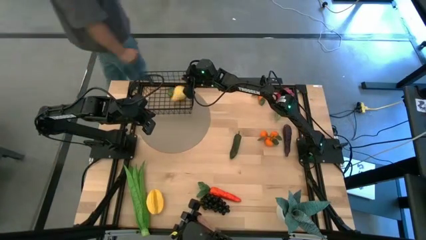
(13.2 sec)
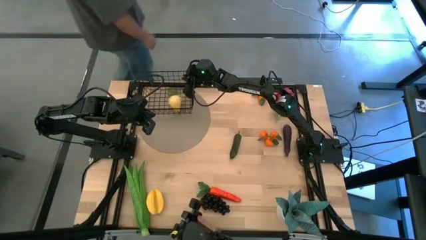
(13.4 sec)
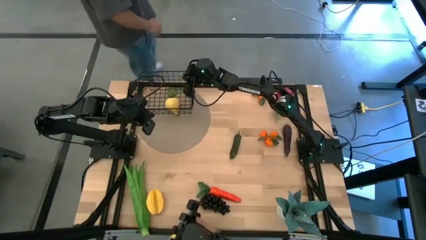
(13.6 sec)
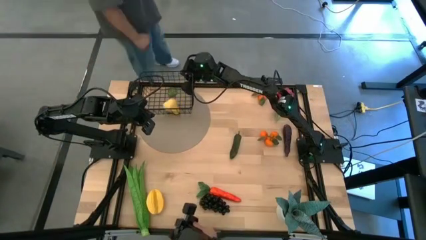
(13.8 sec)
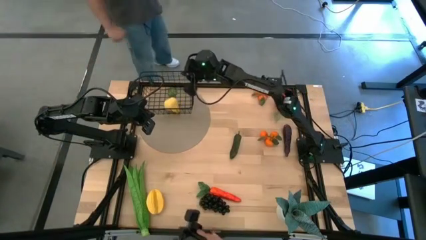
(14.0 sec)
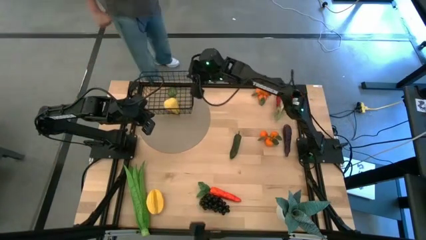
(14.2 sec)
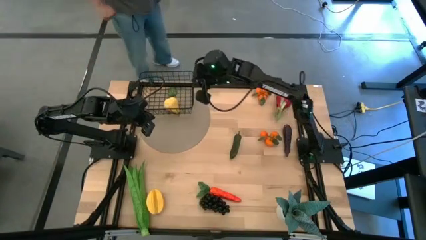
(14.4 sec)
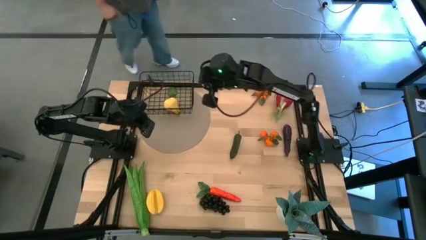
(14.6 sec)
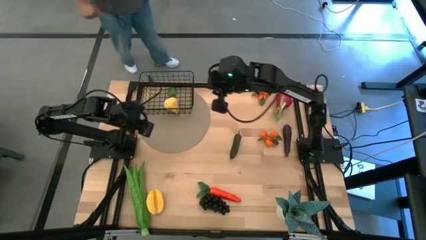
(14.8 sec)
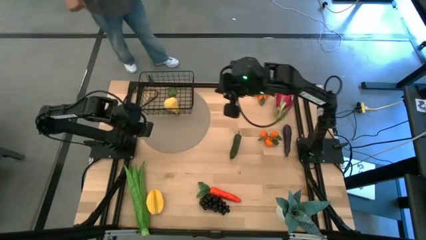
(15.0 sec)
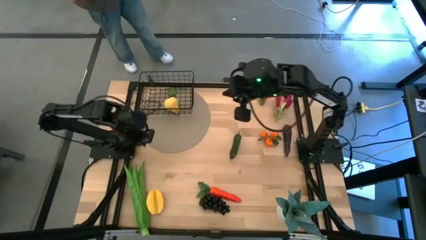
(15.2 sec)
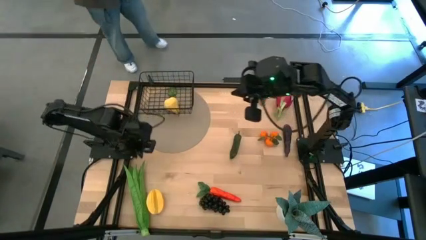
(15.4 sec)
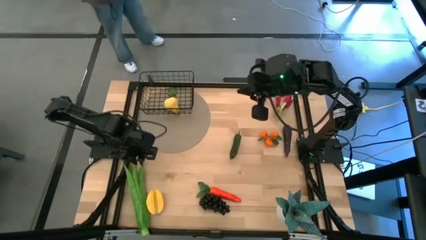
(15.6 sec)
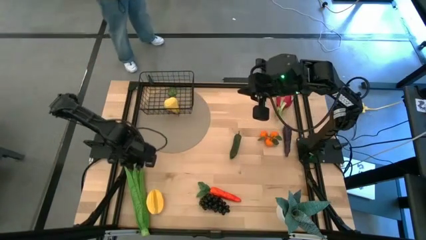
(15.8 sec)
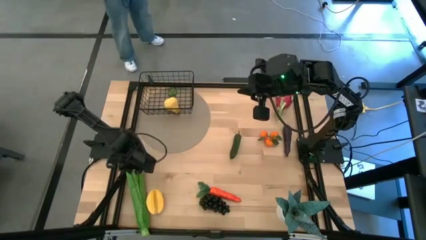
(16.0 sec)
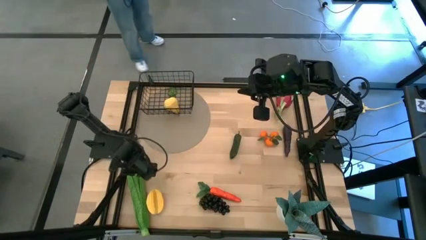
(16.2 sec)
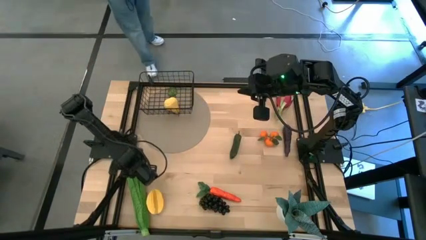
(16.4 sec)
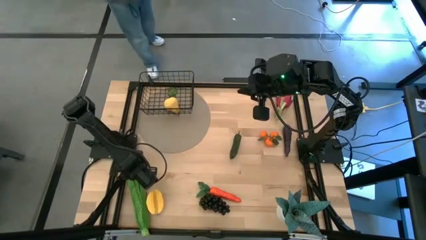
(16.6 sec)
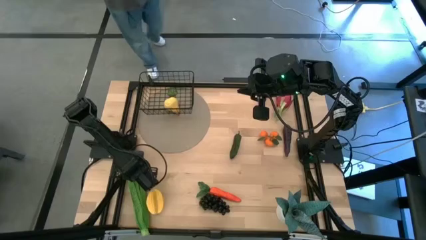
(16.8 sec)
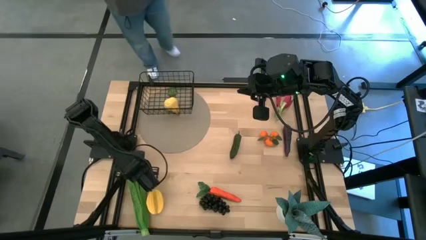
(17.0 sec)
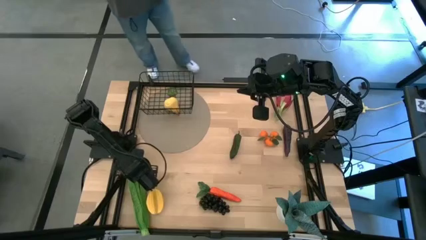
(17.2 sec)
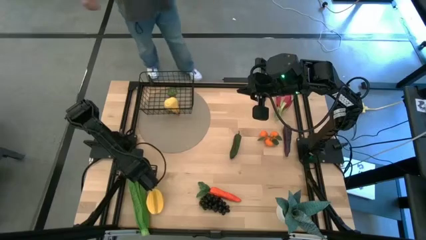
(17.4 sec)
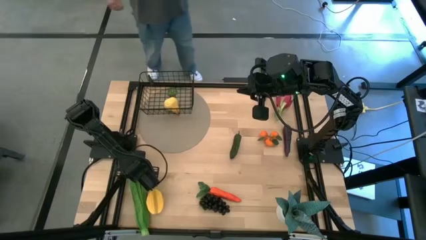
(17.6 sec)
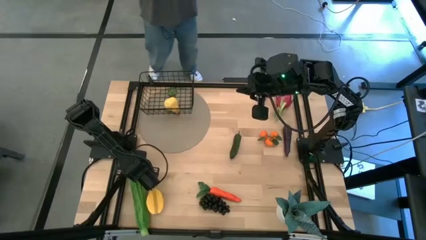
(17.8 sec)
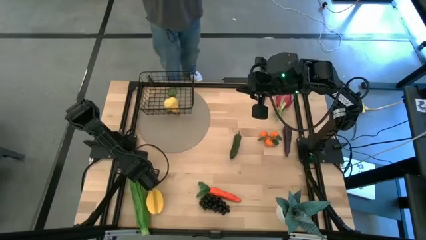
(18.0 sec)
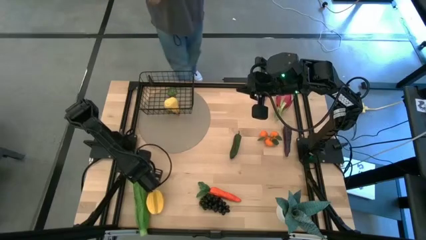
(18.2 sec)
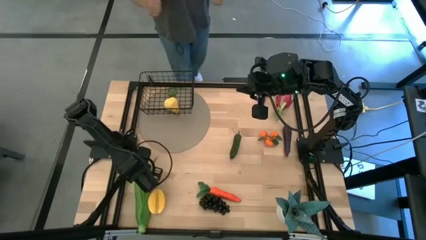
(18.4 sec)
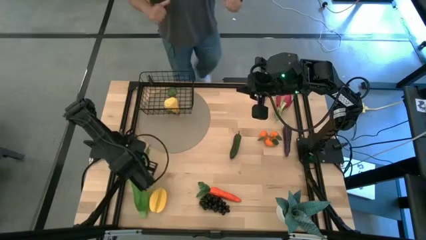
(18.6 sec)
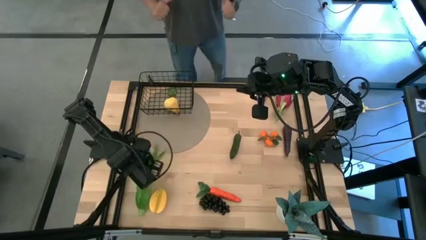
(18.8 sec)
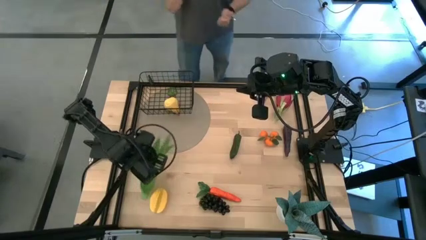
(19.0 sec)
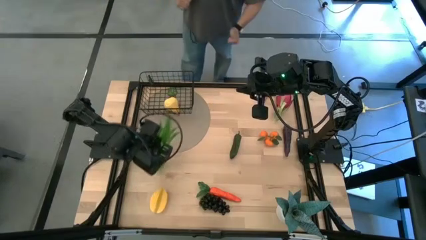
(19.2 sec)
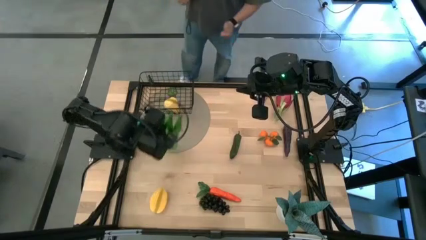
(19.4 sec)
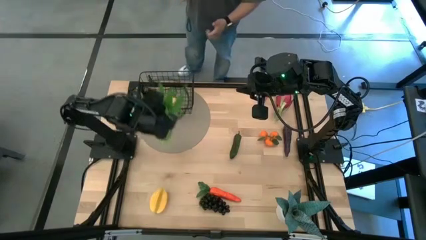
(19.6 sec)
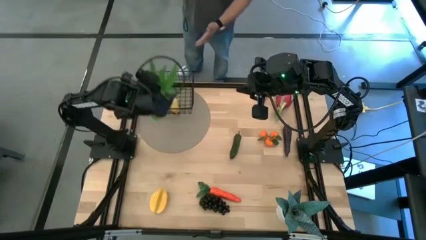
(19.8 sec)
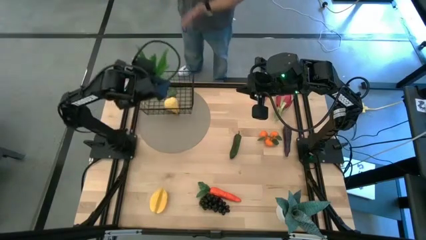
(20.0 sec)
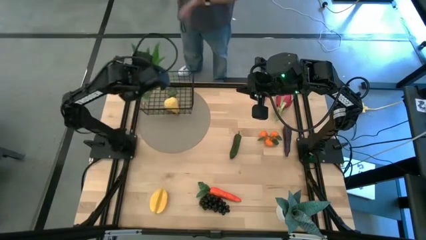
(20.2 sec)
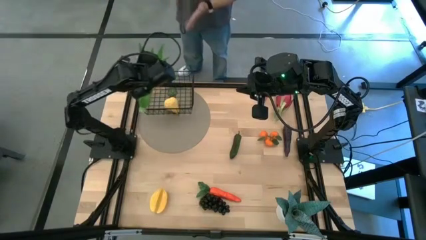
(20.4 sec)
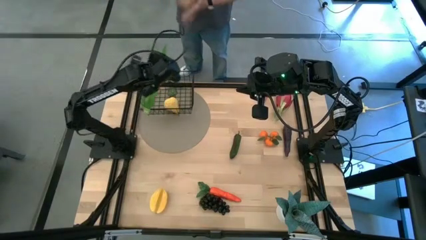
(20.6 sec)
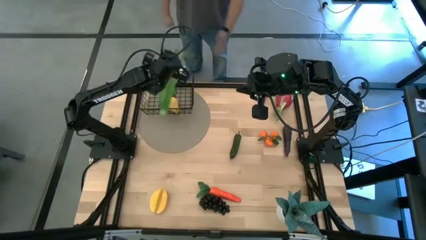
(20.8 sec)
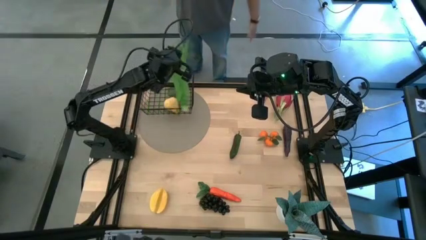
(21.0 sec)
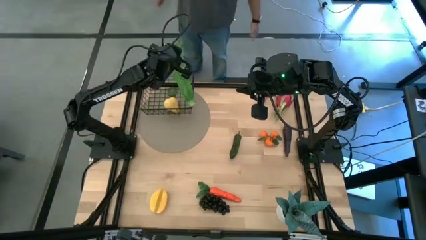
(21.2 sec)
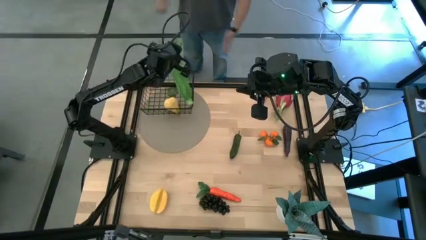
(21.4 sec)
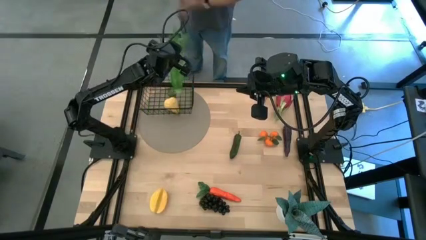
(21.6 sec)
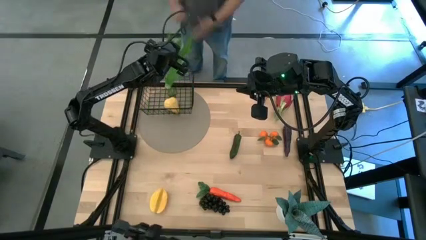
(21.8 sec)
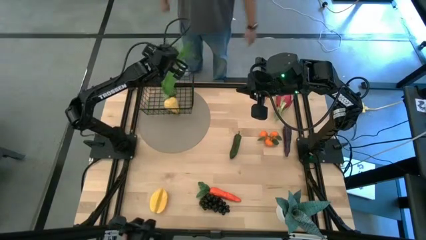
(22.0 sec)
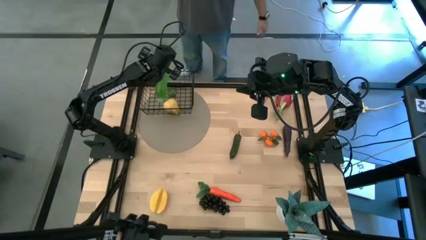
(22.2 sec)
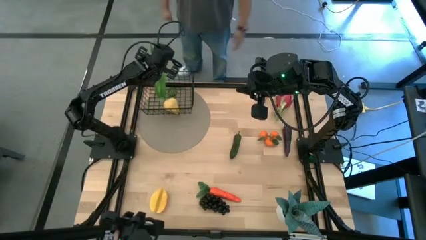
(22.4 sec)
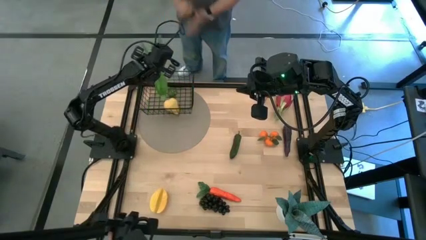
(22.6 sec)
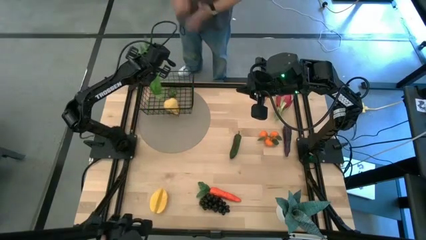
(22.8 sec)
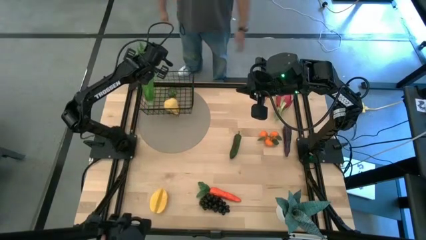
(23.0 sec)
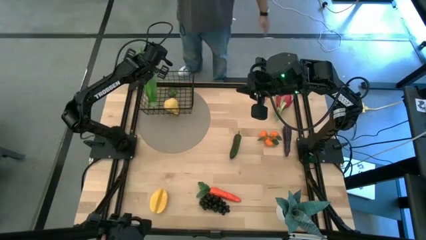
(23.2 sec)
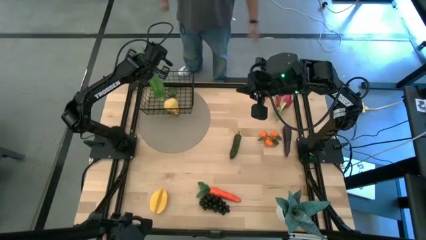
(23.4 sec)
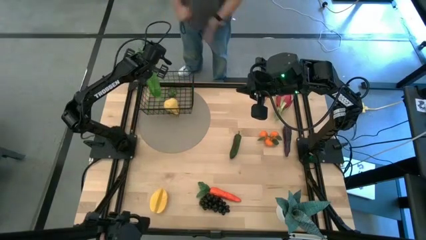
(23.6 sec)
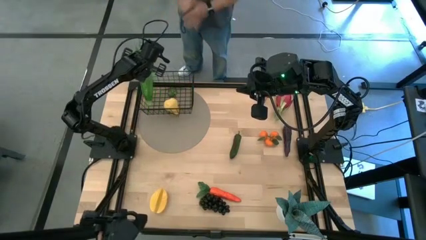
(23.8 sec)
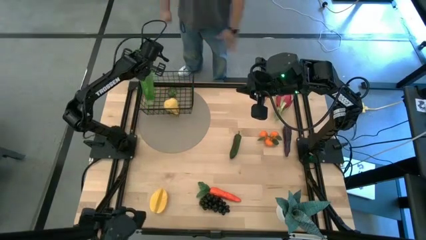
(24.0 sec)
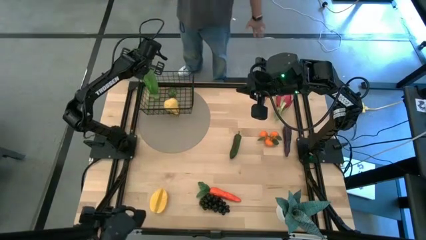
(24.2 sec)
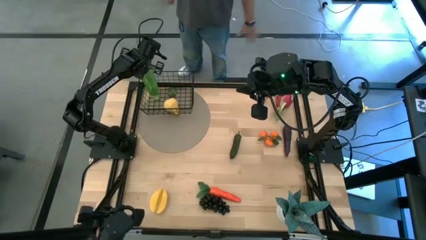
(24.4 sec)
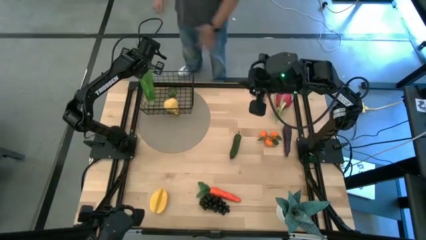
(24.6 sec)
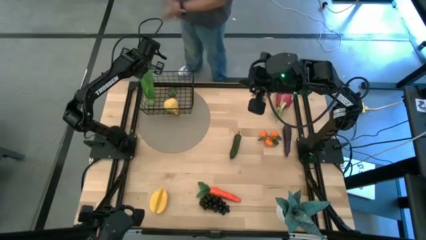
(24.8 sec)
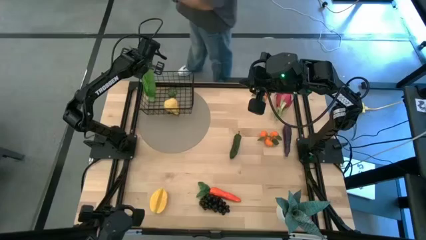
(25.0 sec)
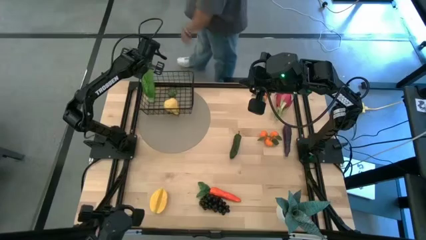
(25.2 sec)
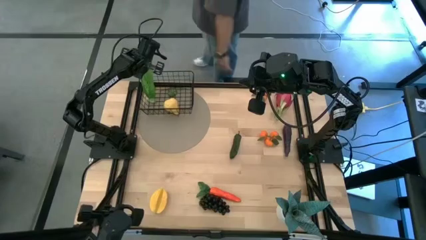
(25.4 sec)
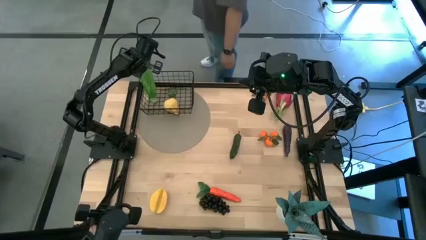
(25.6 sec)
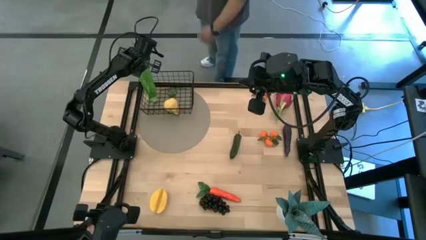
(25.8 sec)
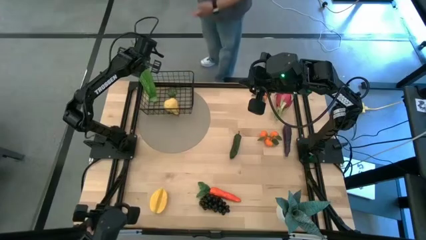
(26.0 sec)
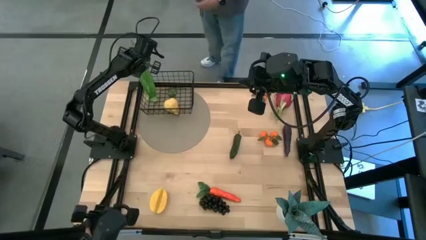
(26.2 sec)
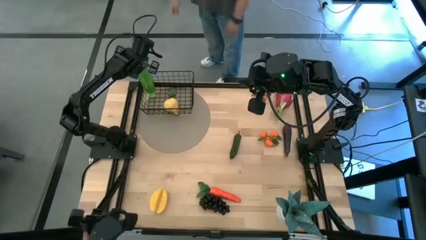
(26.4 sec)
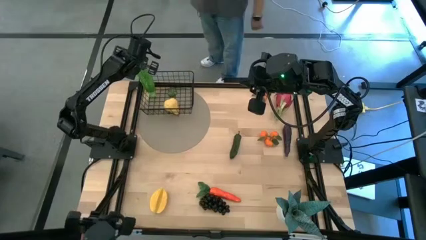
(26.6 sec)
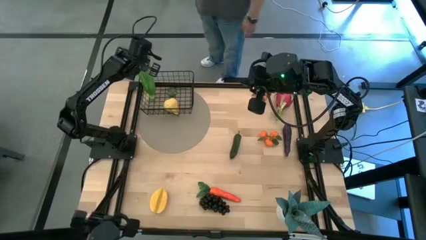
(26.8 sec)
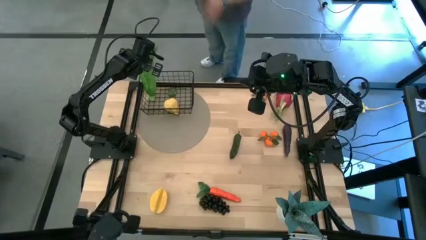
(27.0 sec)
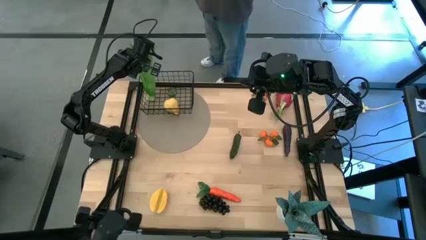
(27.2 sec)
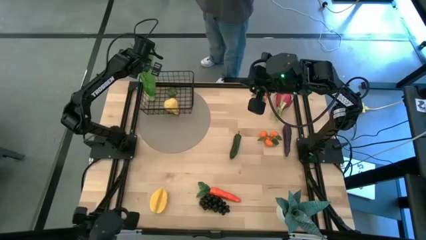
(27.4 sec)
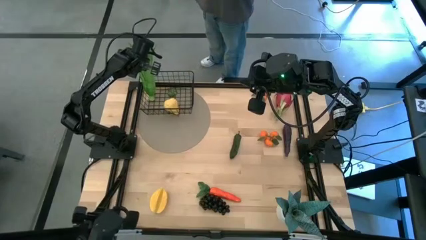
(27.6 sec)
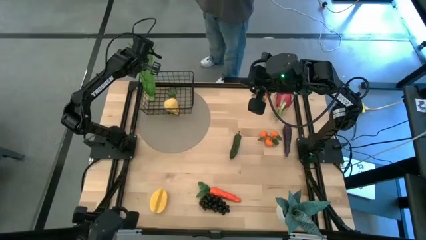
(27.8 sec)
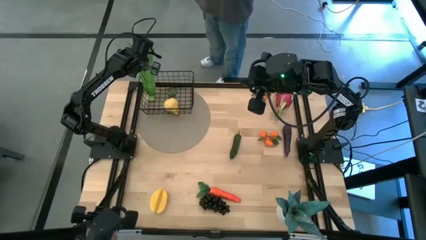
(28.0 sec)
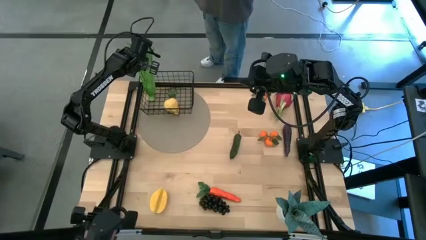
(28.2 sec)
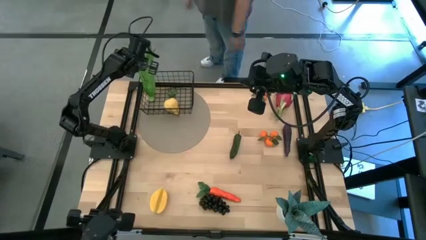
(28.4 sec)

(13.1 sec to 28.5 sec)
Task: Build produce basket
Put the green aloe vera into the wire basket
